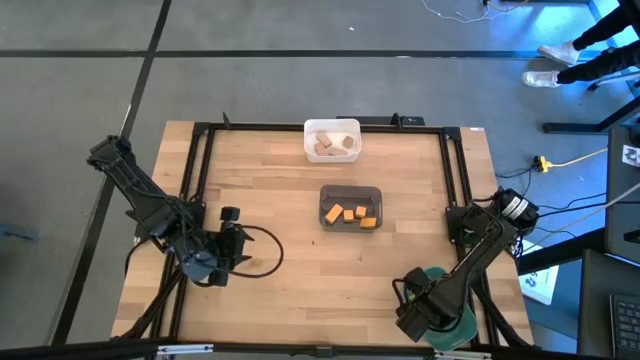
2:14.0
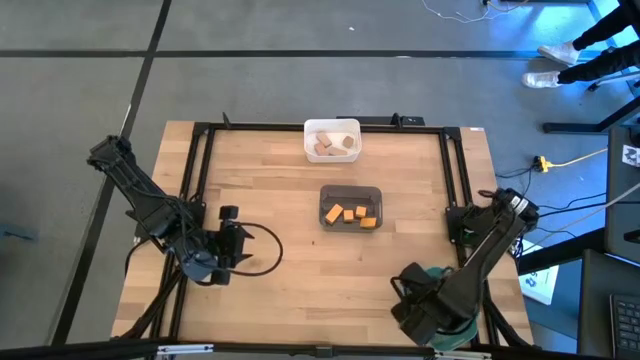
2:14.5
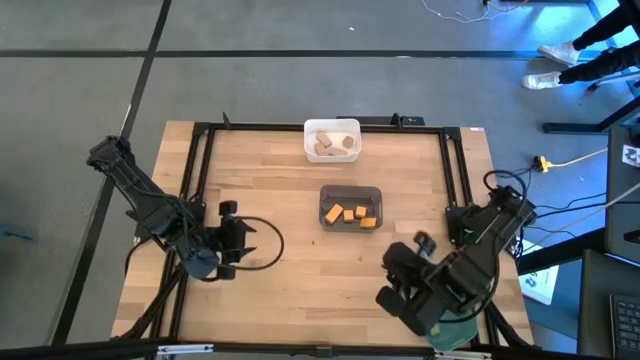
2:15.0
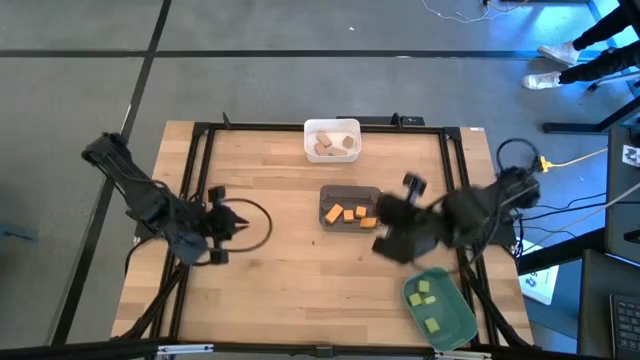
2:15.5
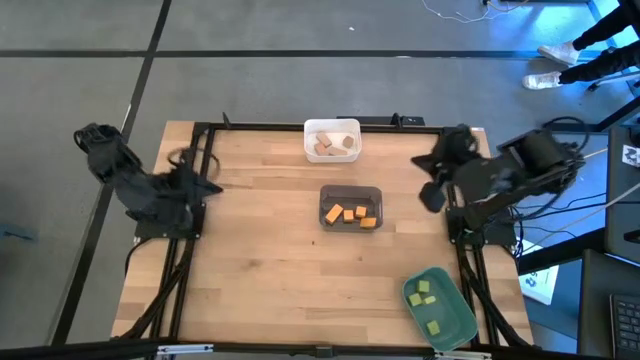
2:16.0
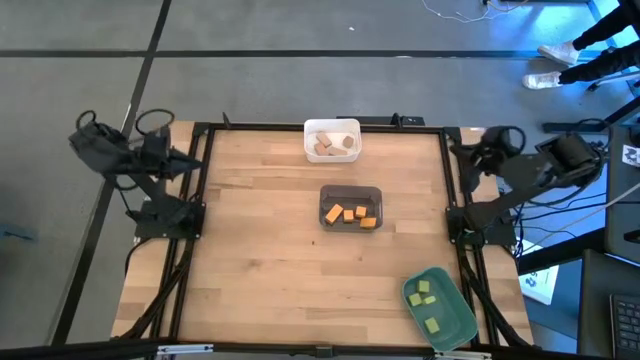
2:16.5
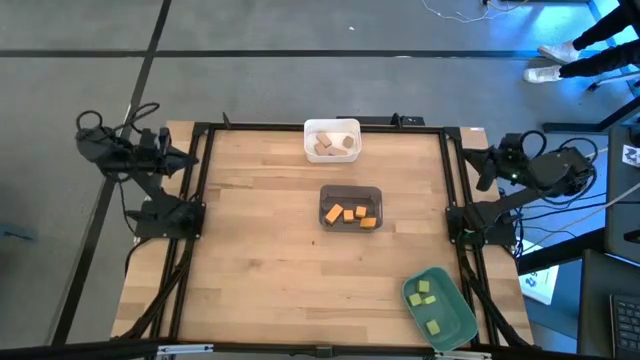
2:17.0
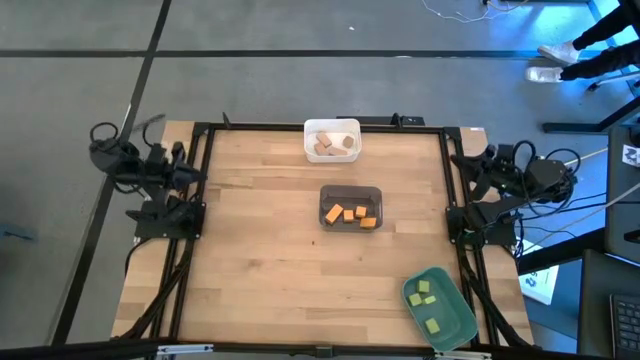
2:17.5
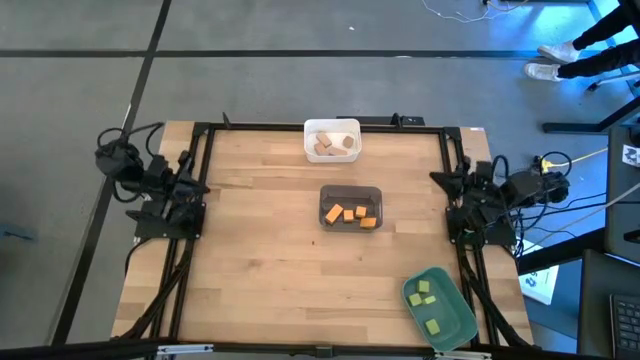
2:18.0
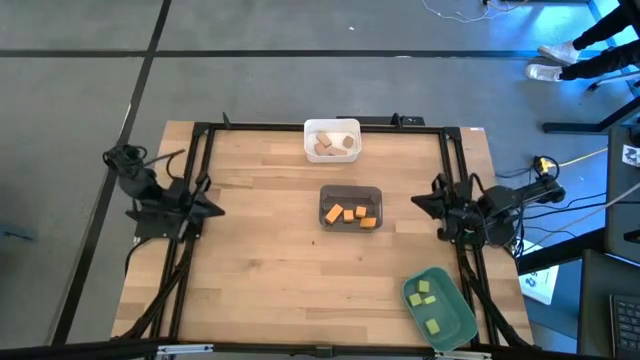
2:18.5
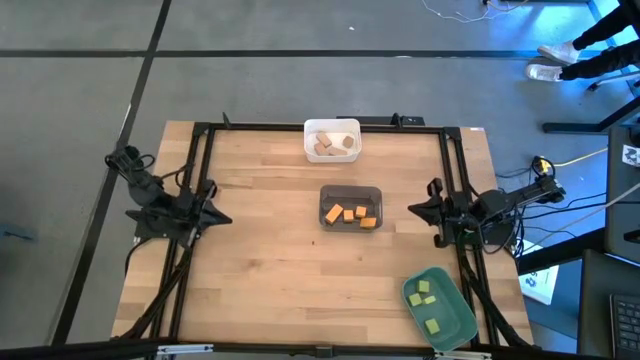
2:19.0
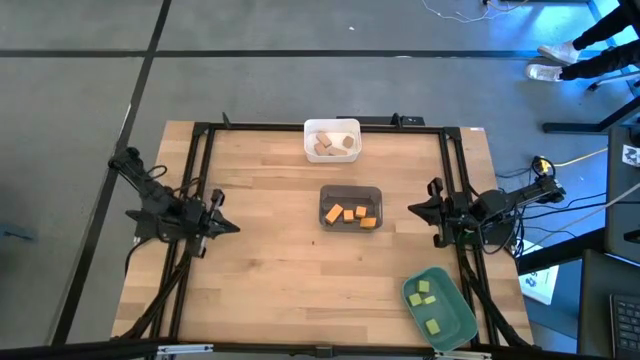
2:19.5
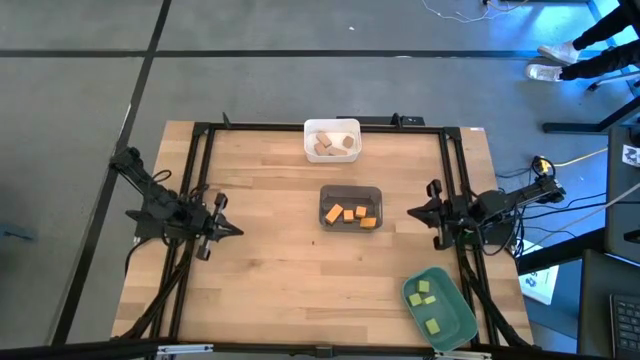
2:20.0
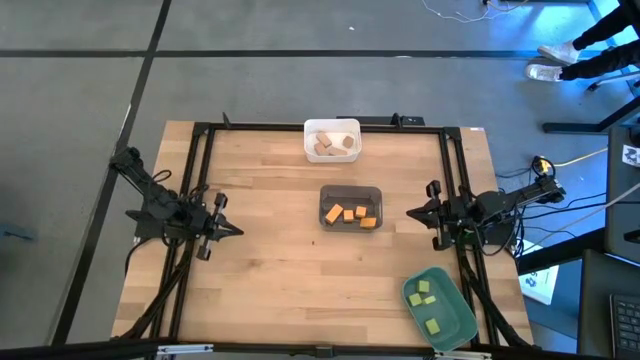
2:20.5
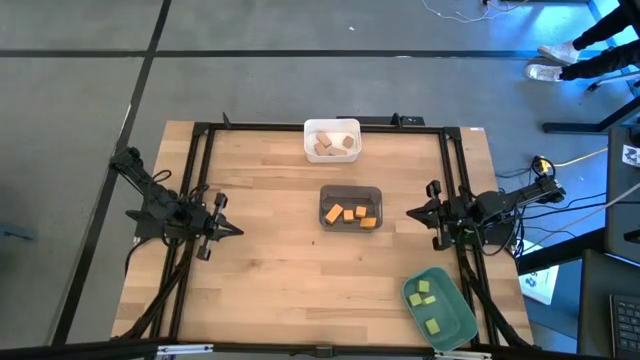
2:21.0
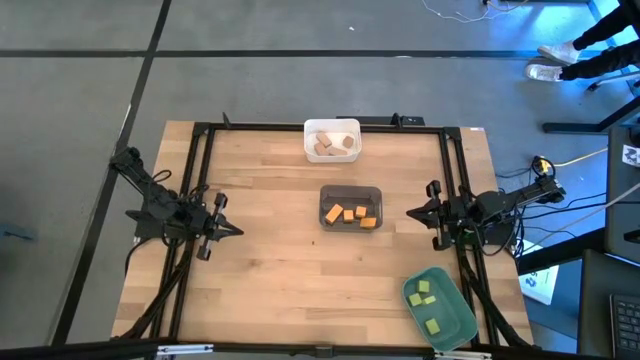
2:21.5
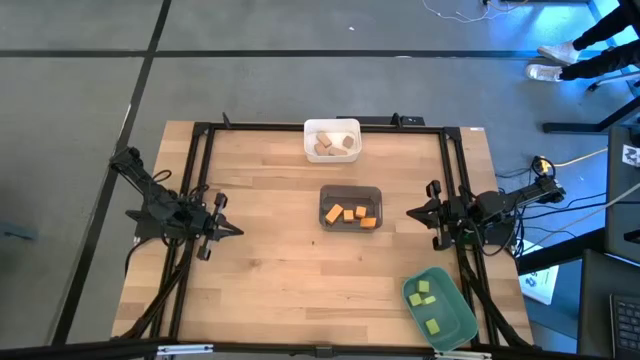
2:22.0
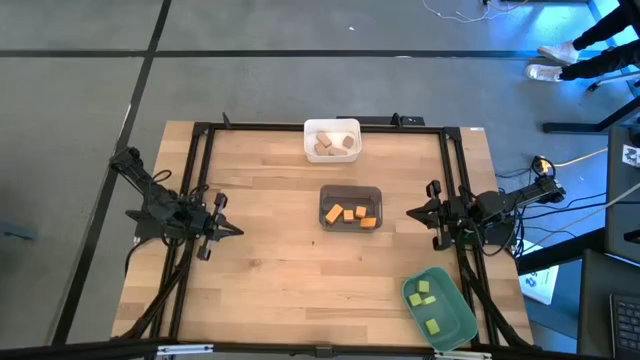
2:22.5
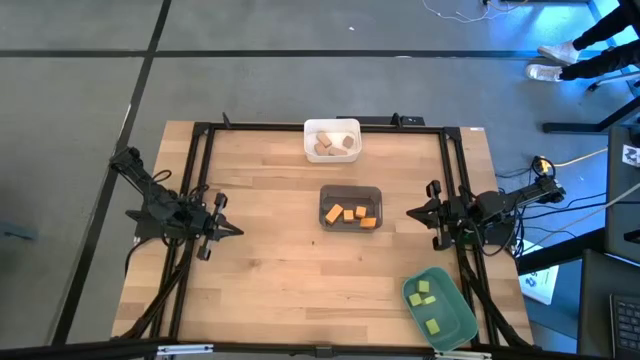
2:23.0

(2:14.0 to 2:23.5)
Task: Sort & place blocks by color
Return to Home Position

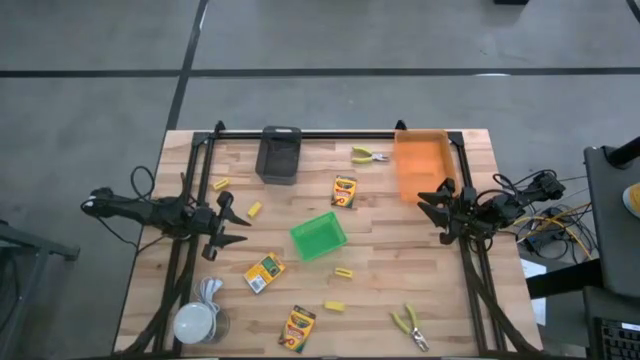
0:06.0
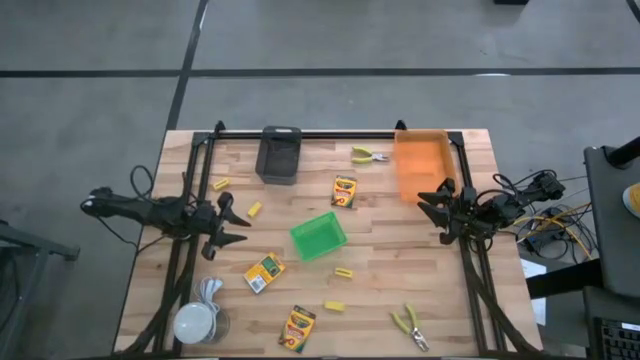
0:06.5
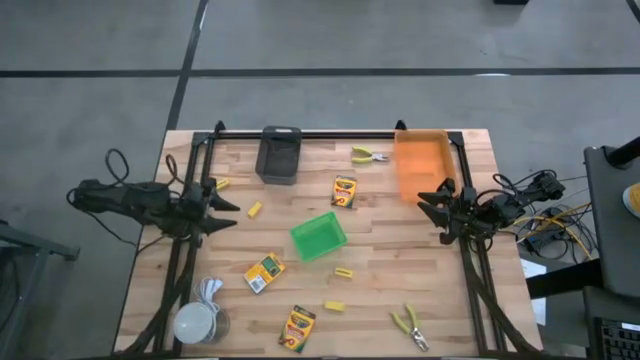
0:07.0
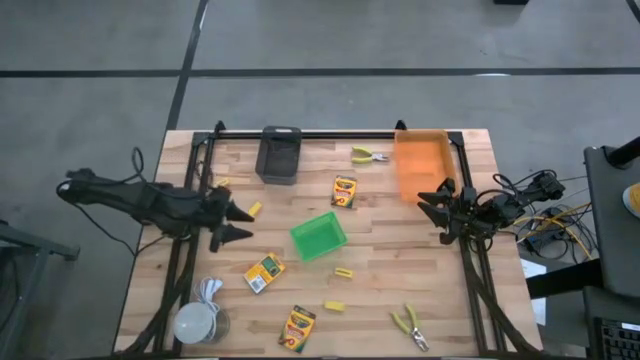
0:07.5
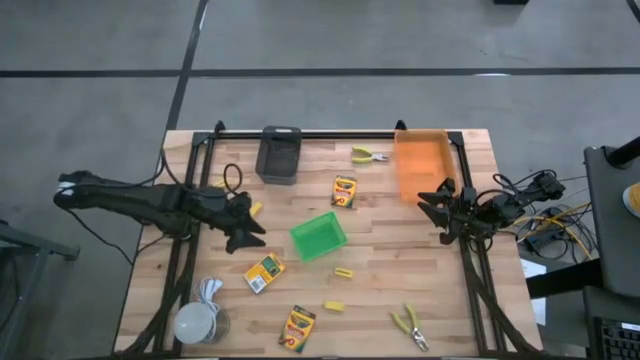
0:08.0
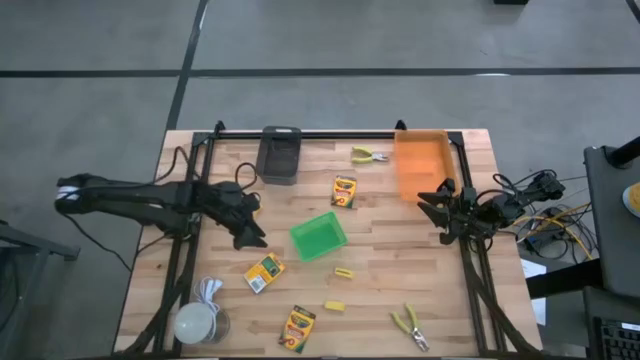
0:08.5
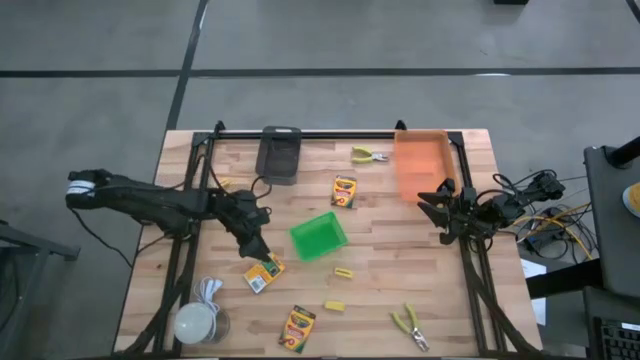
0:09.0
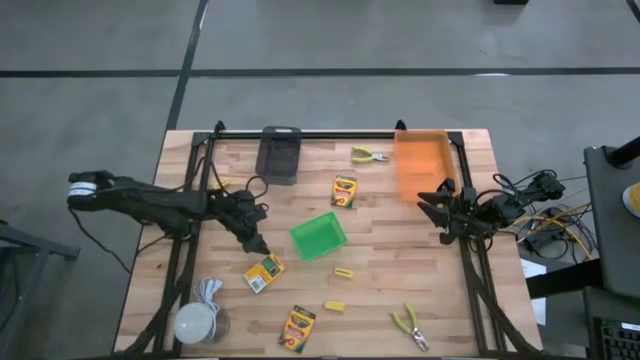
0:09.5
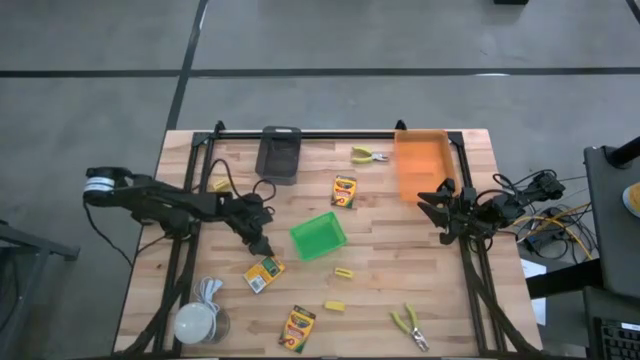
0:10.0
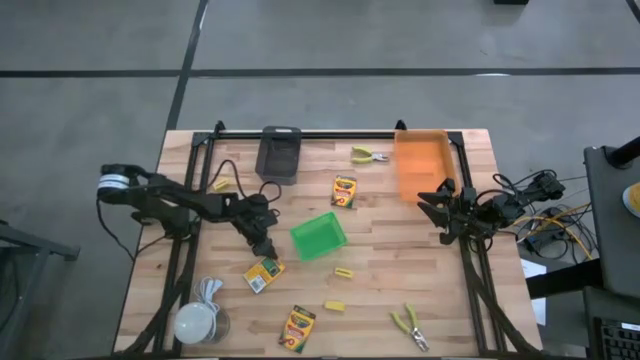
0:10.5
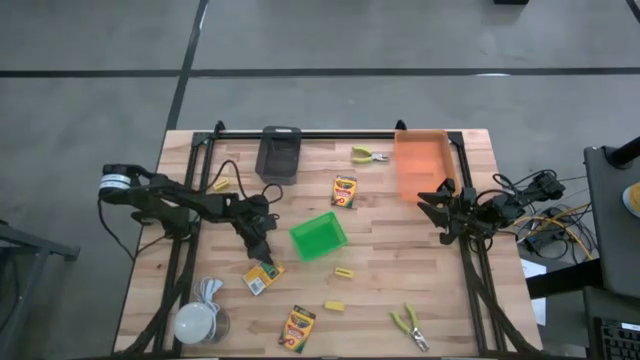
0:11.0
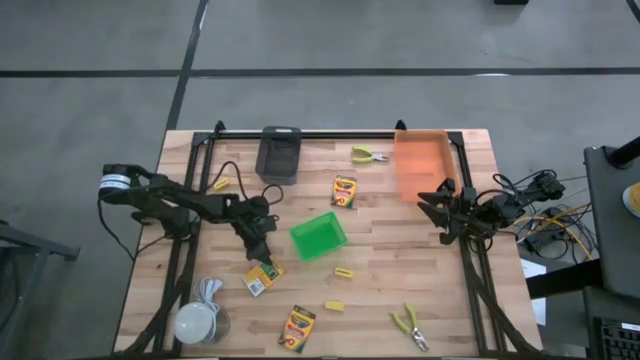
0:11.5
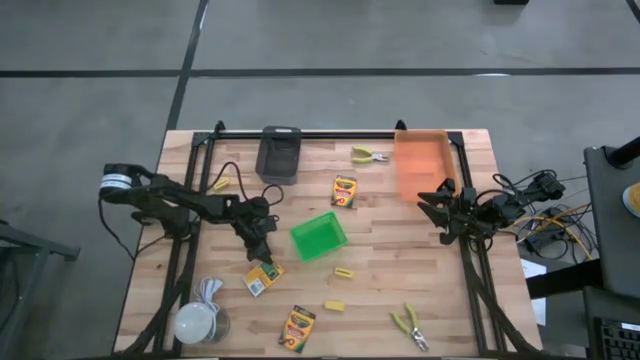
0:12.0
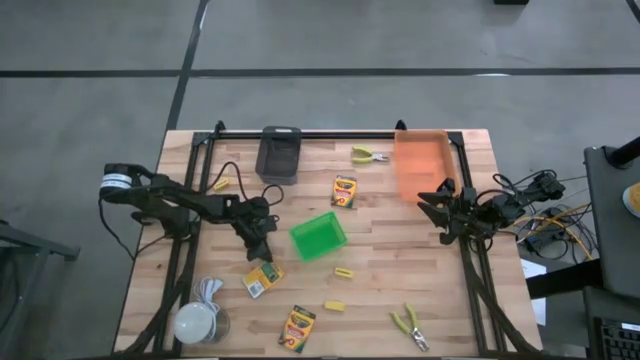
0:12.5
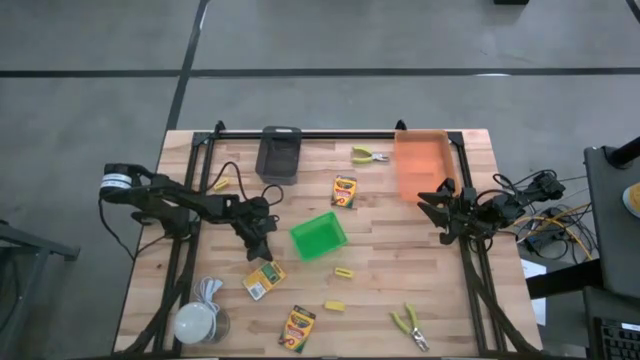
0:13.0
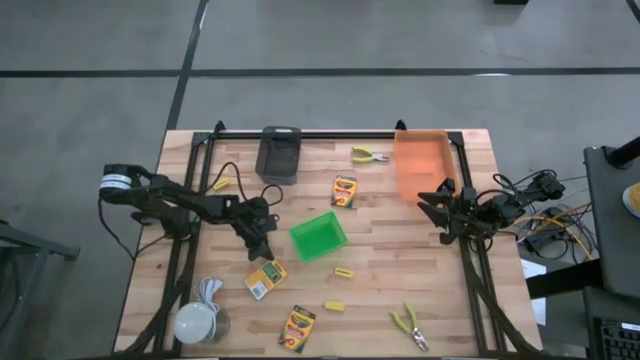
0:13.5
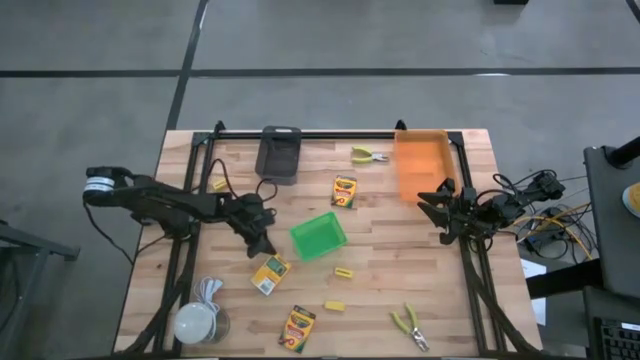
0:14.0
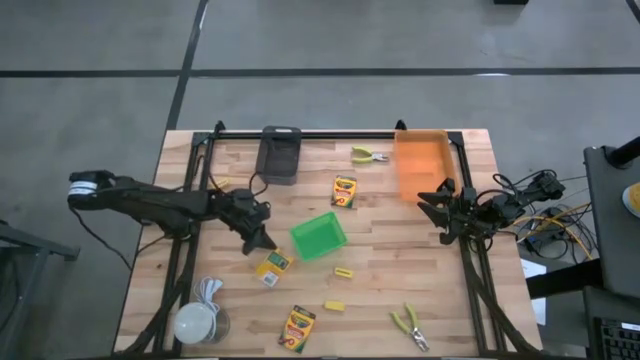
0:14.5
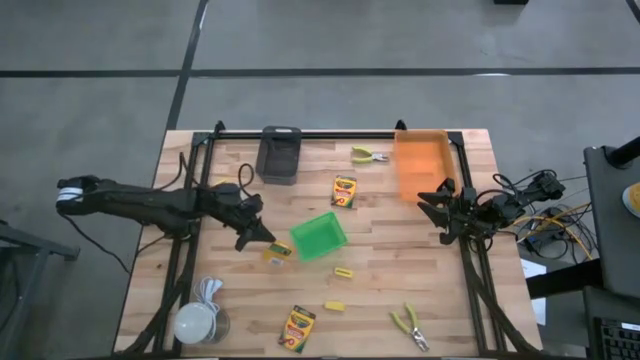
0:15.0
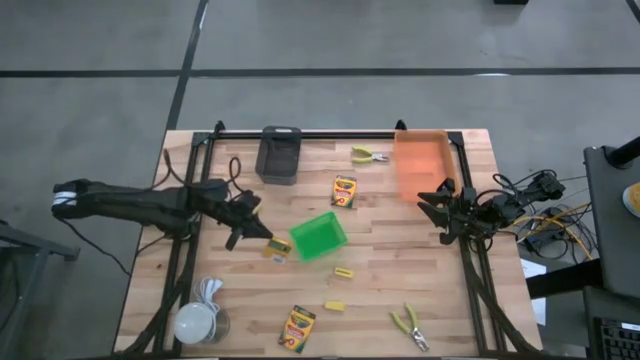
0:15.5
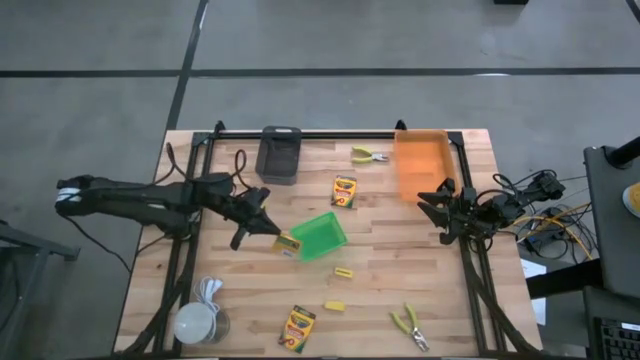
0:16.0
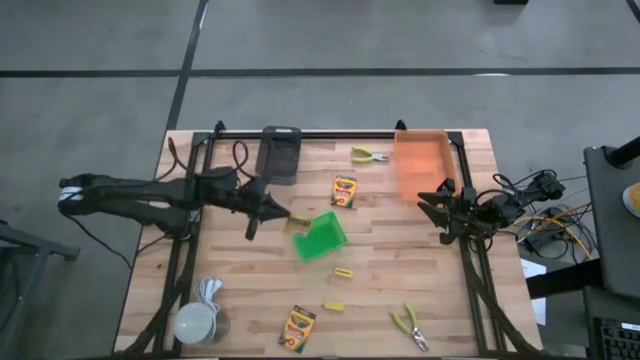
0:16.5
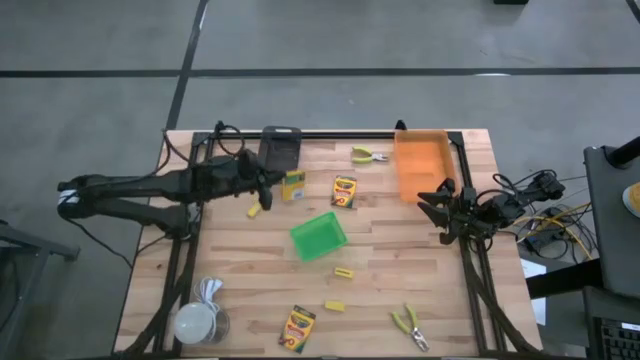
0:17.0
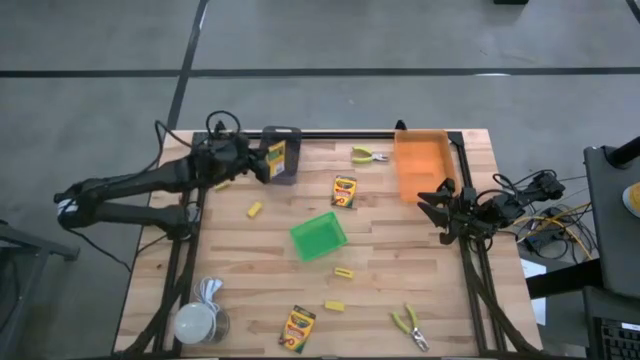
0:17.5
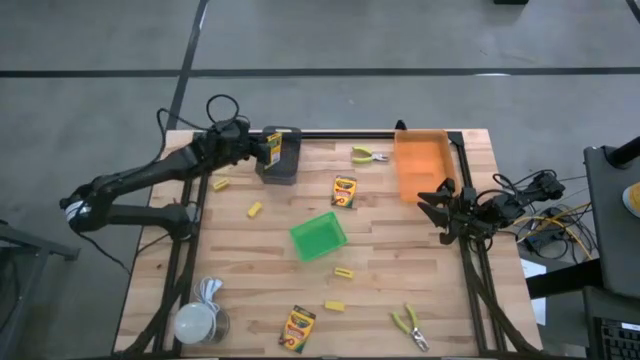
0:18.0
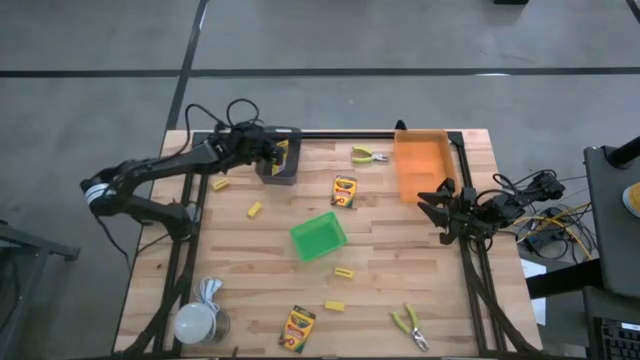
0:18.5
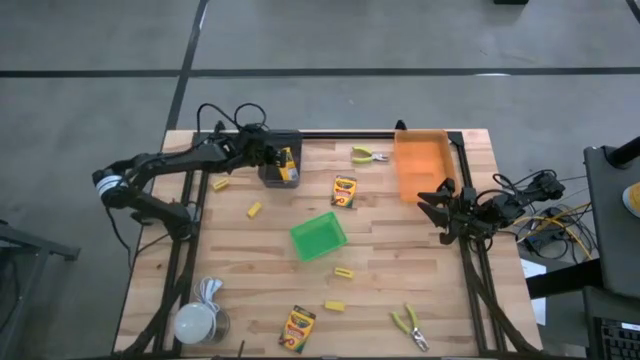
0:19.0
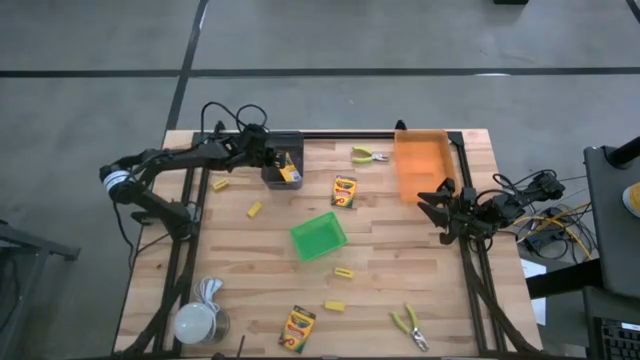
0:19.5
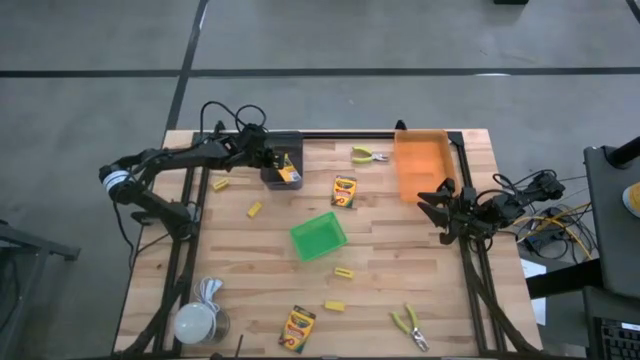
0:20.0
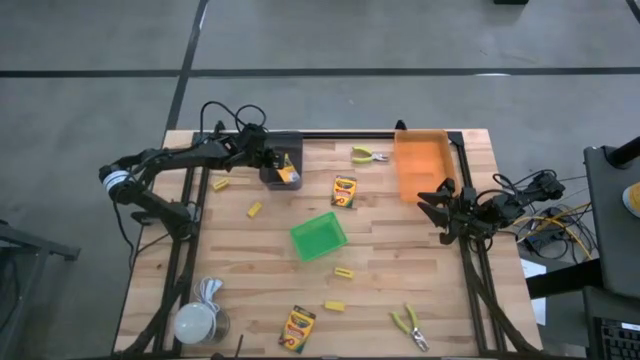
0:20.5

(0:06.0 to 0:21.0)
Task: Pick & Place School Supplies
Put the middle yellow crayon box into the black bin
